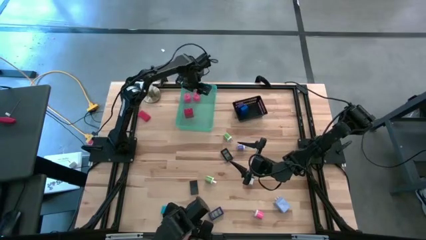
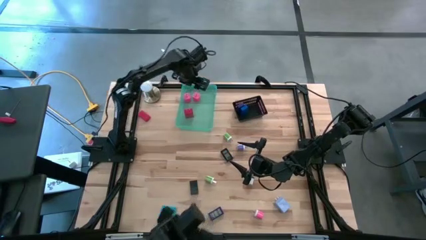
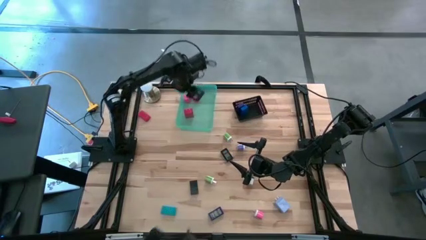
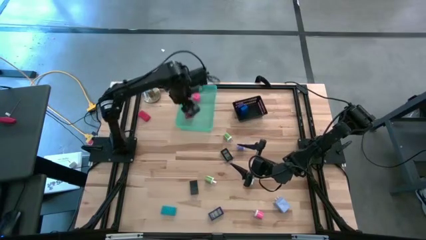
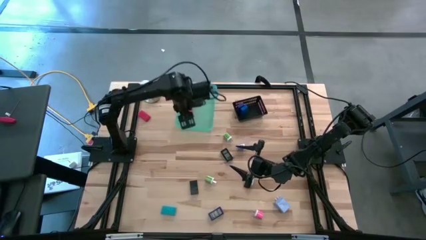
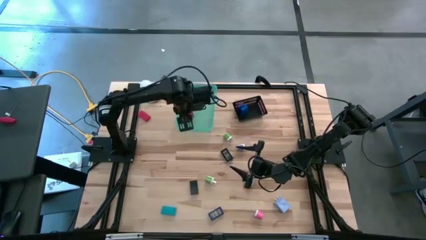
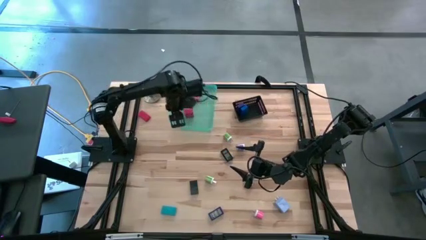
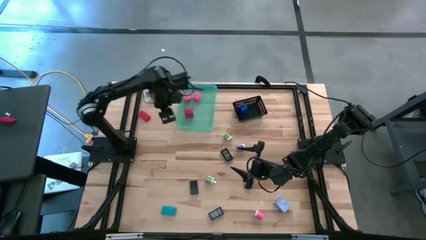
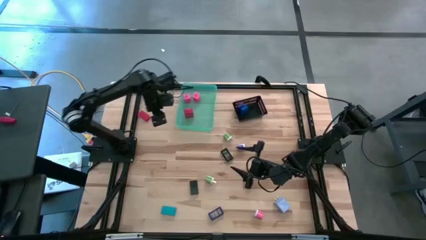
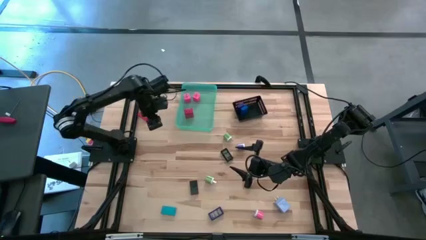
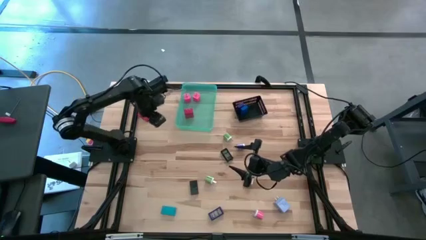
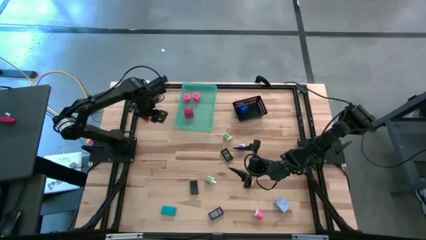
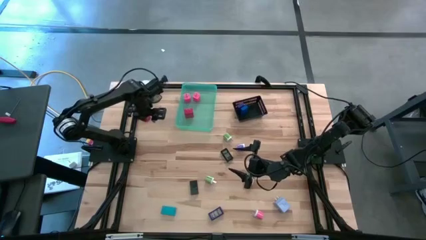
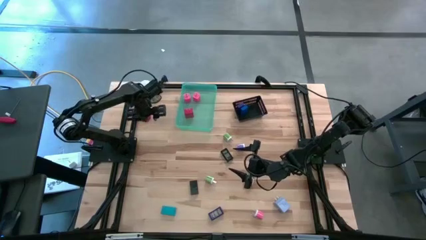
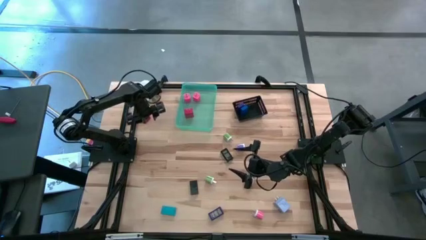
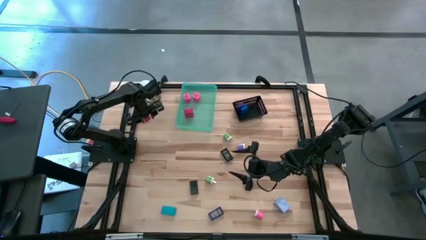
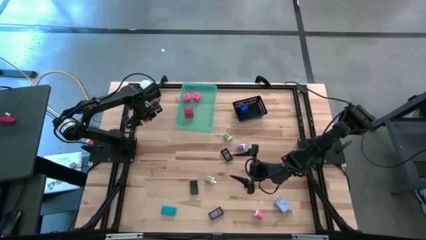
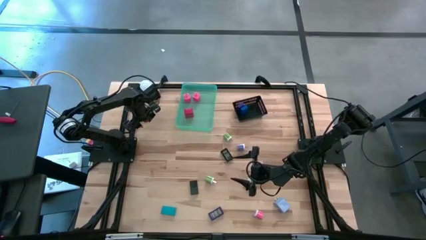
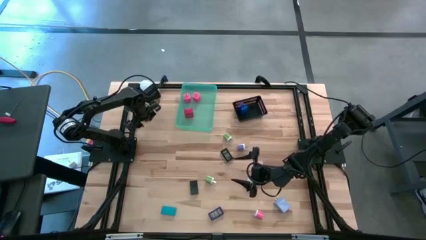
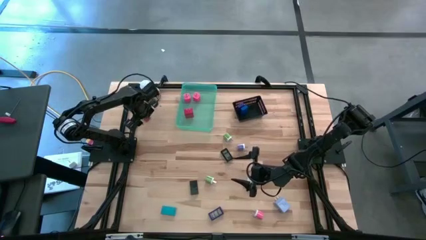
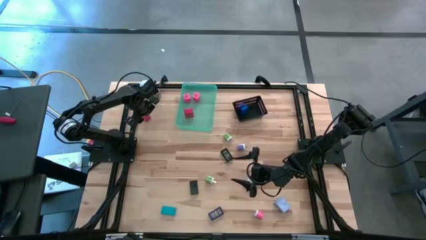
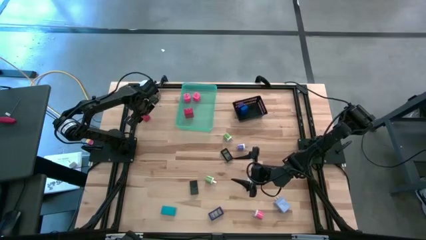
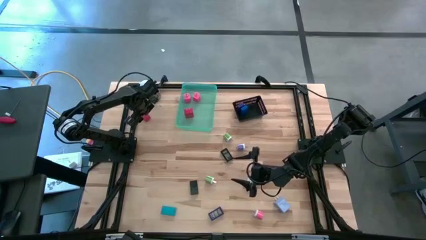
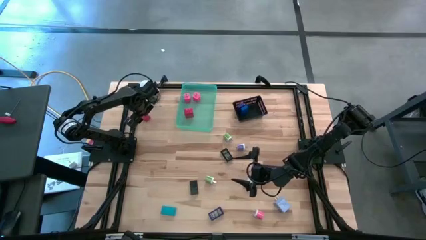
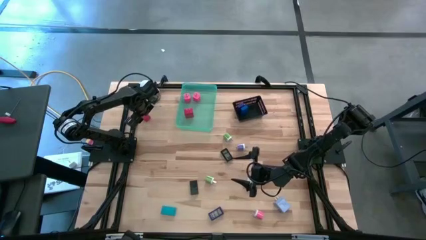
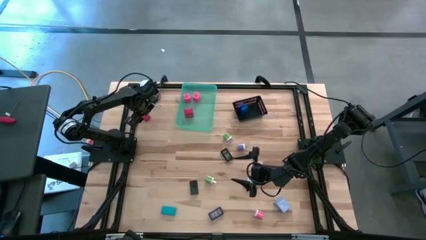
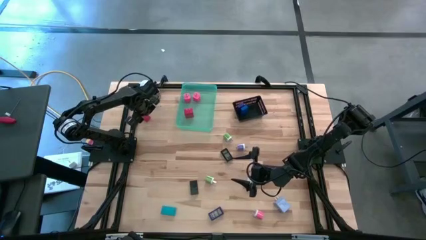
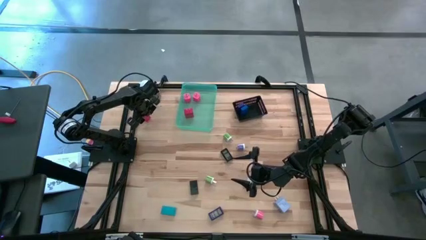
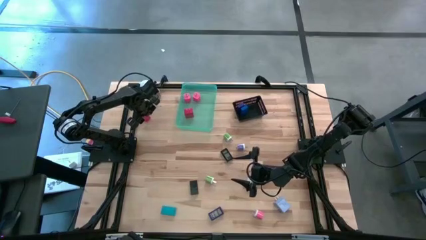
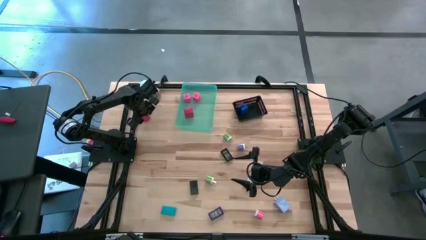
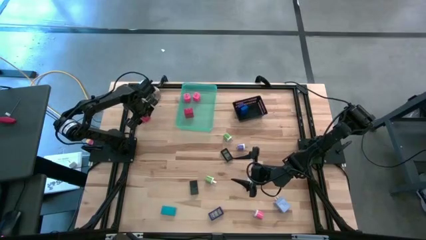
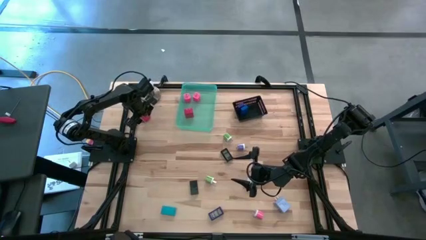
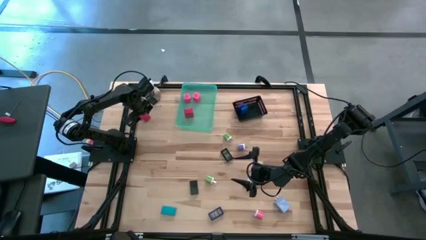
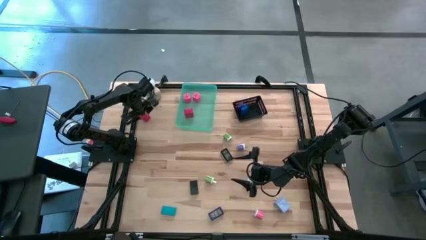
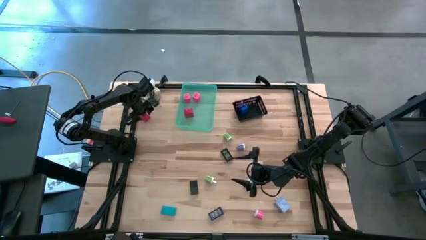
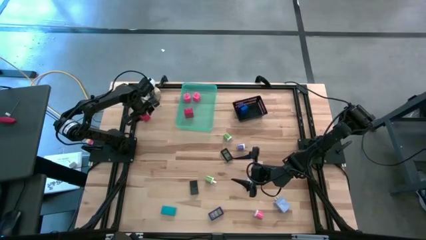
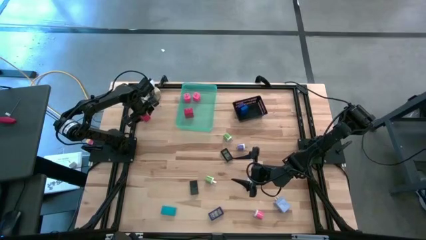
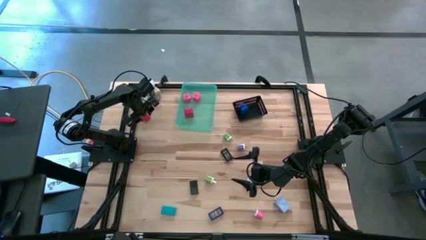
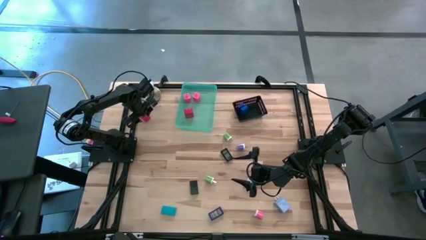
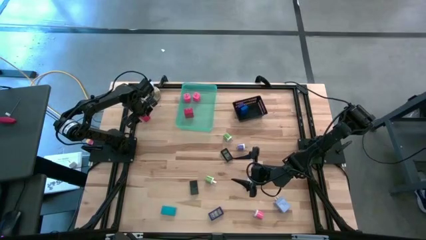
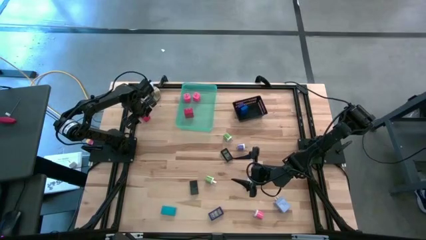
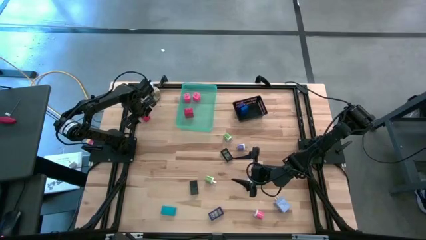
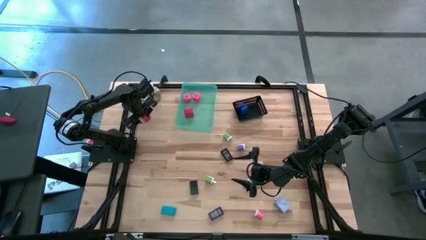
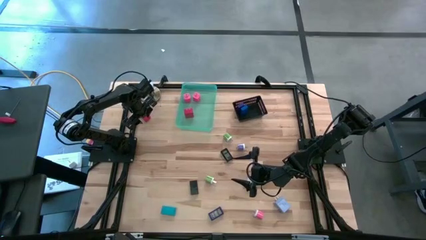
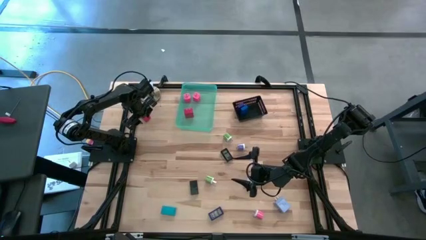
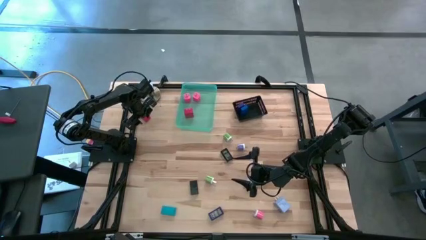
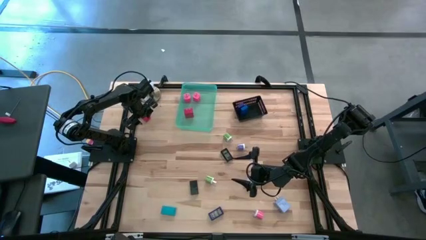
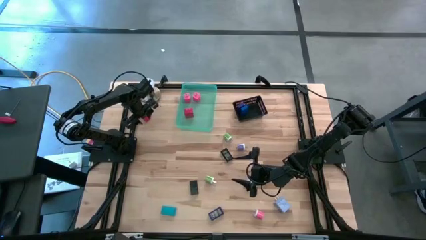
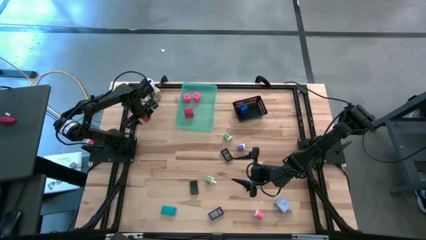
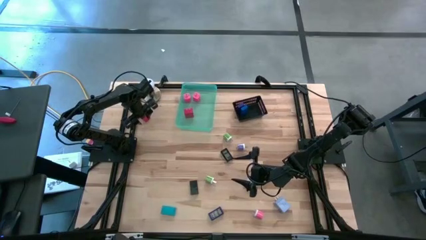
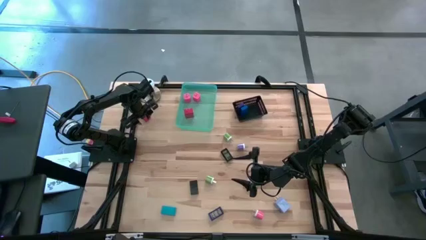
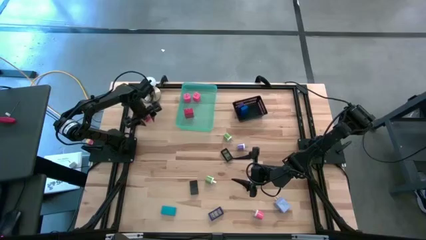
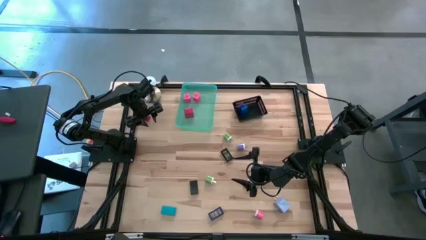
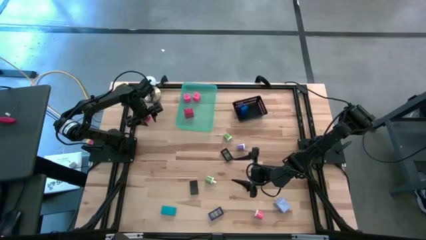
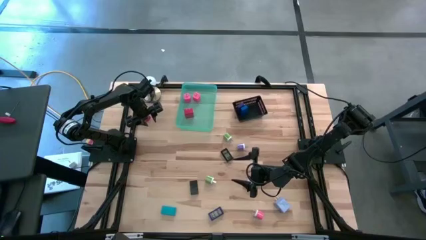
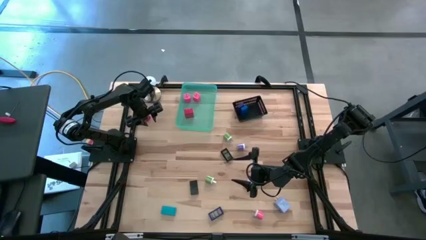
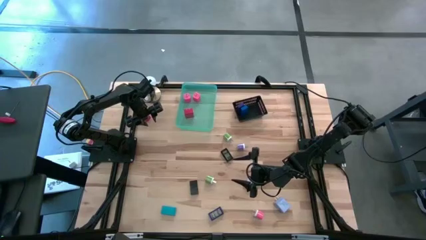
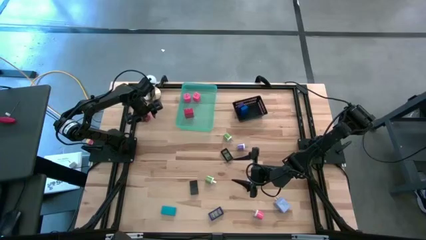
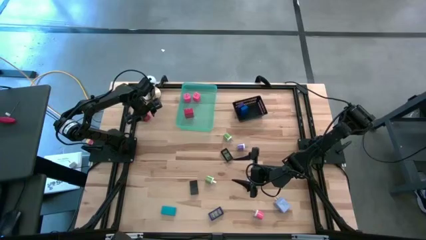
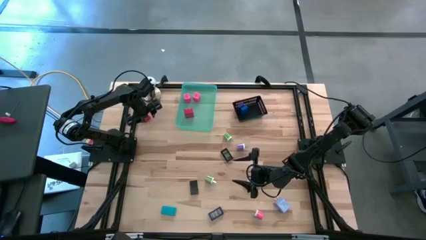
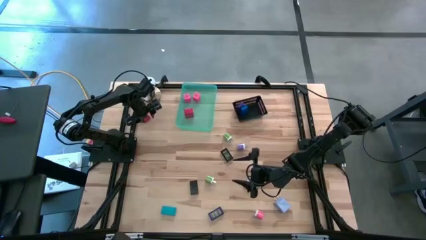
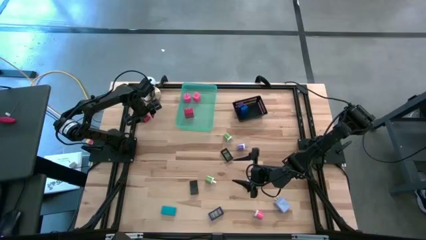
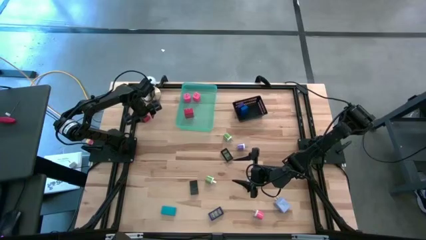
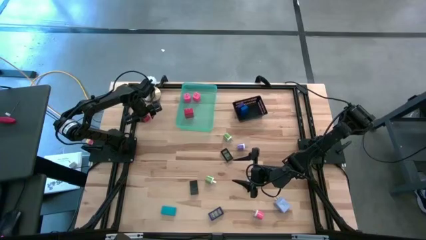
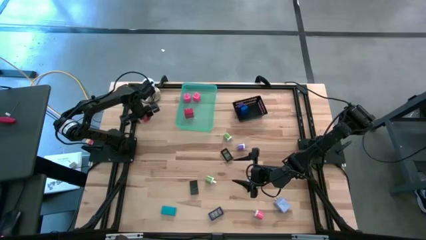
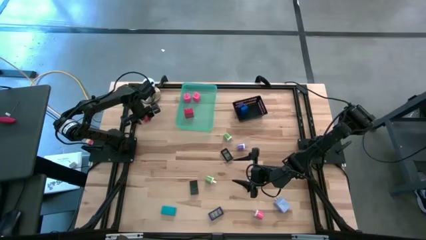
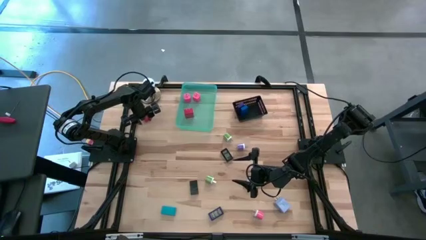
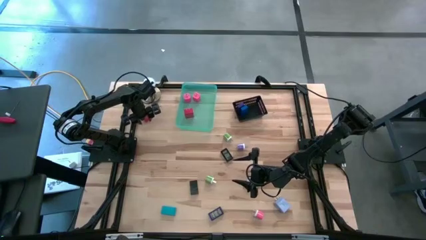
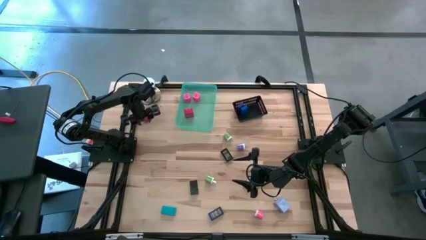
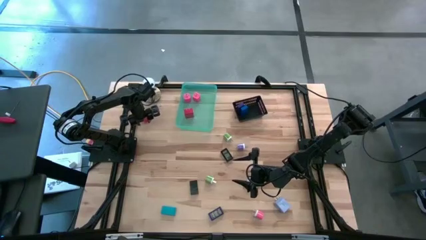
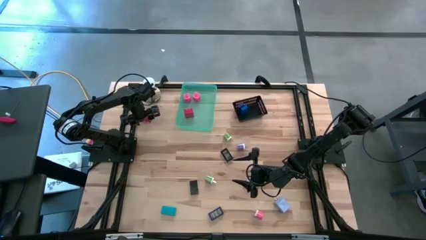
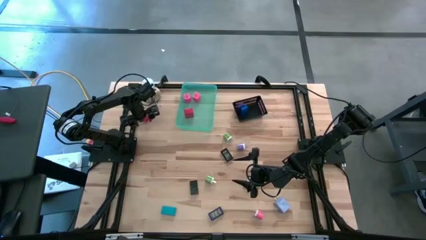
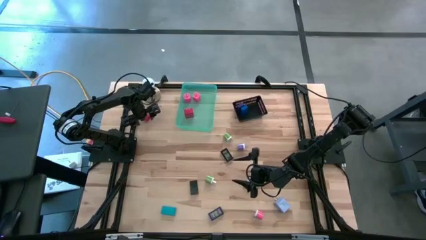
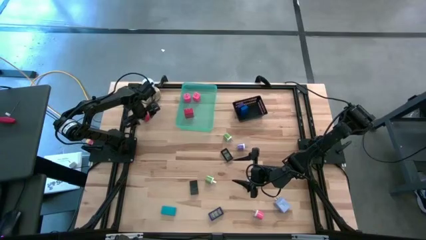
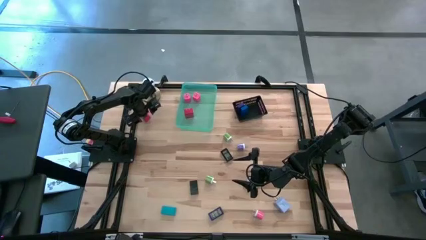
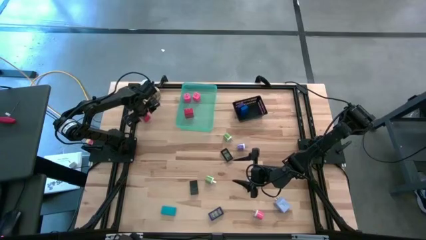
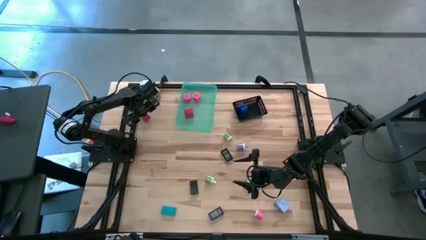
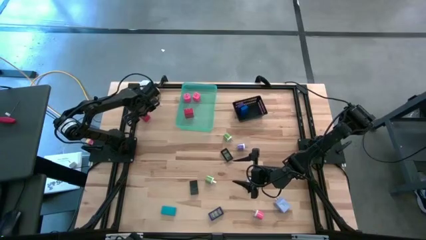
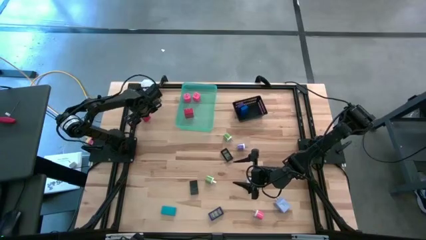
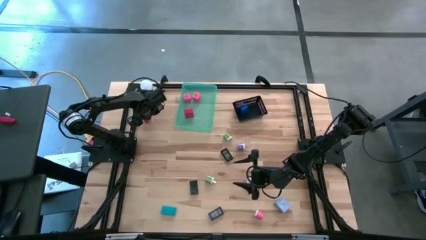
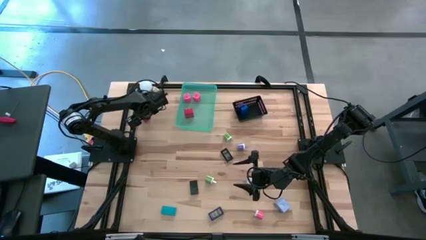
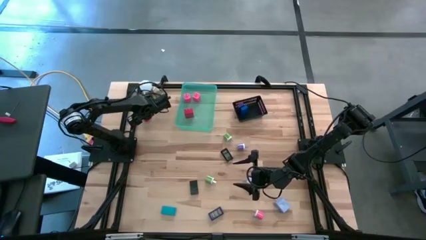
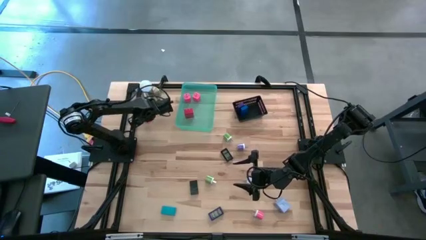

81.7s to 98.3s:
Task: Pick & Place Office items
Put the red digital clock into the black bin
